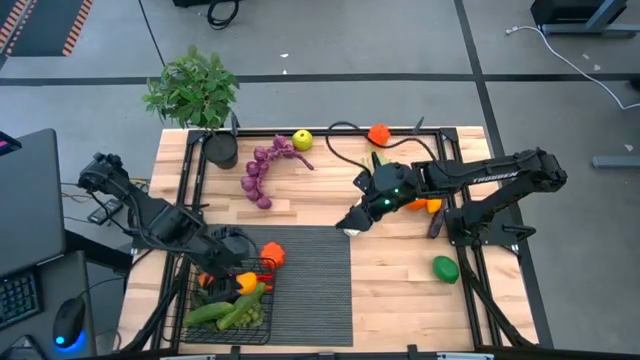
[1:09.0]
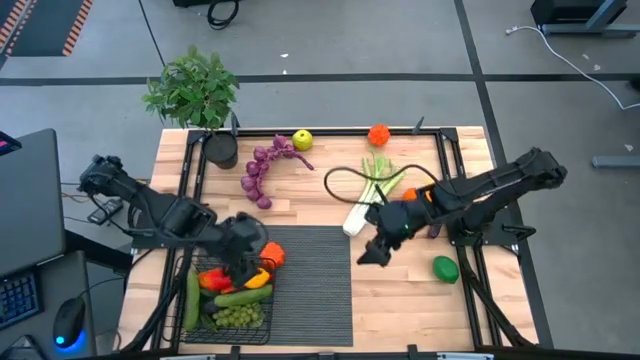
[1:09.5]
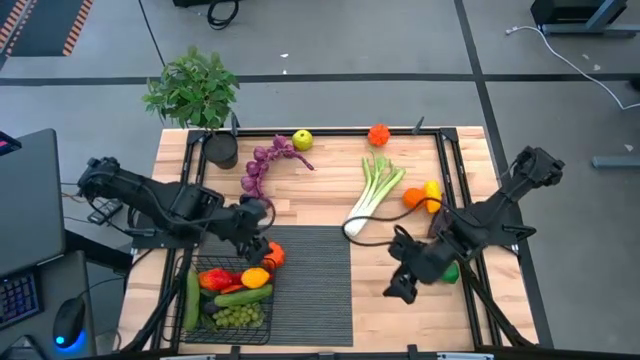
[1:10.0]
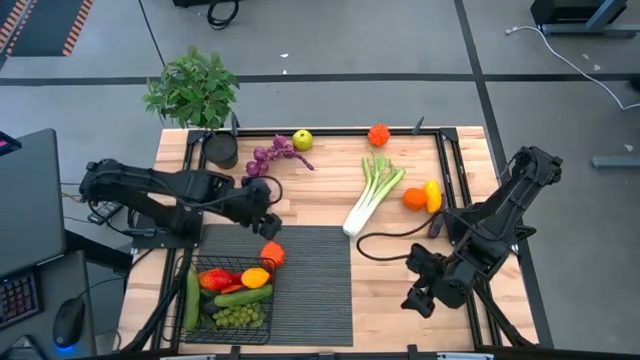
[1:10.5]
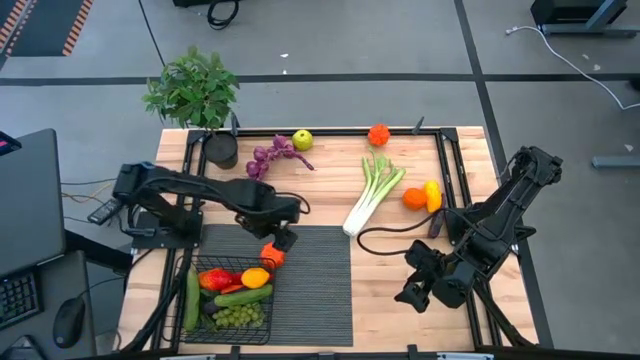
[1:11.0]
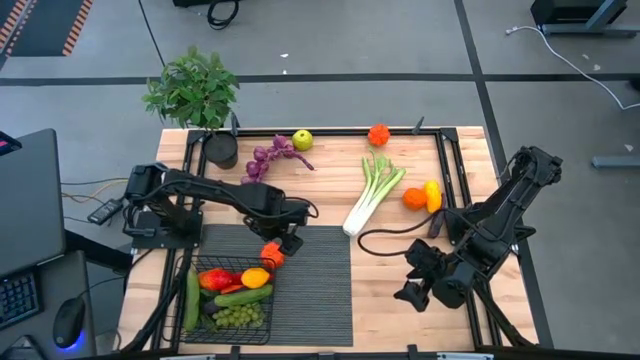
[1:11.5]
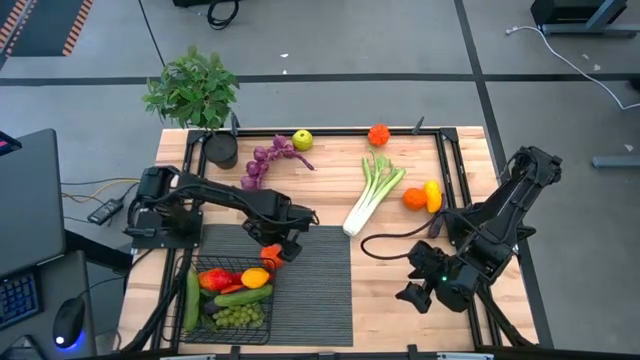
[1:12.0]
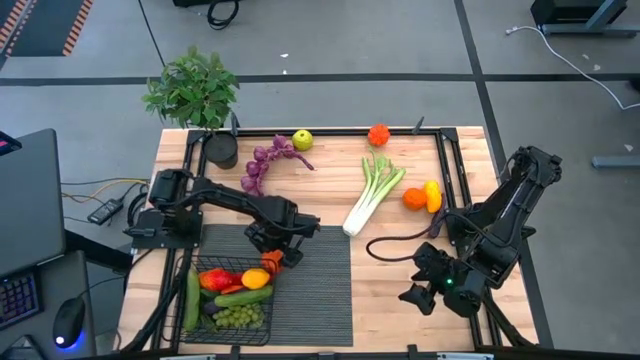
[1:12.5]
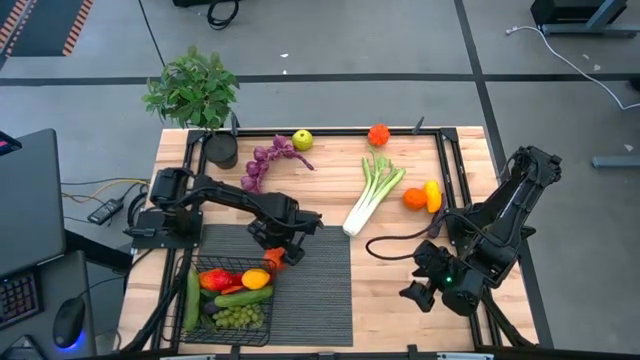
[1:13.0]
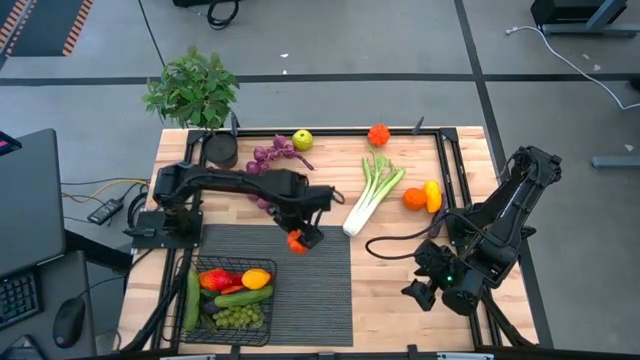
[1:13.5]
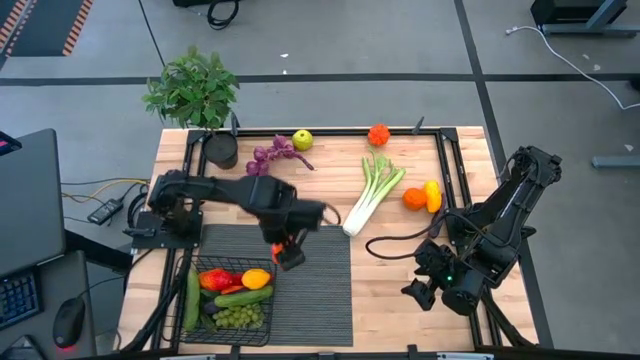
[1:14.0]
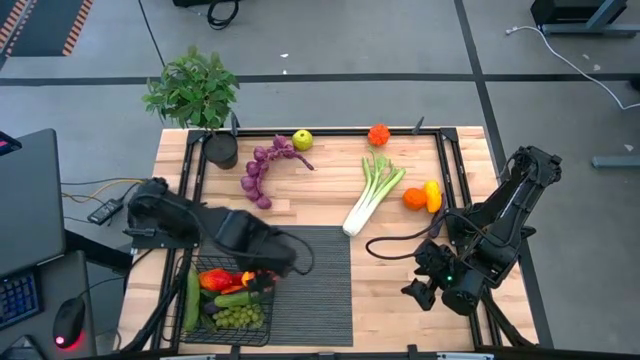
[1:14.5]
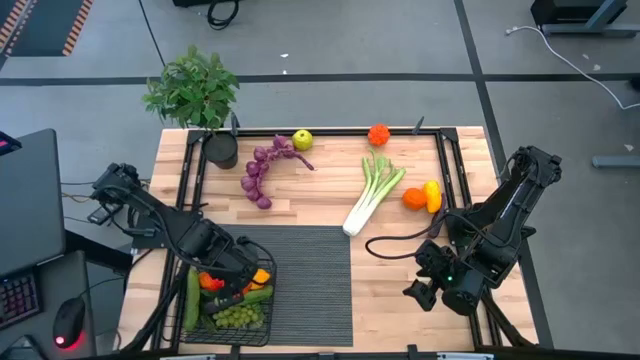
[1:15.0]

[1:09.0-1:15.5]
Task: Build produce basket
Put the bottom orange pumpkin into the wire basket

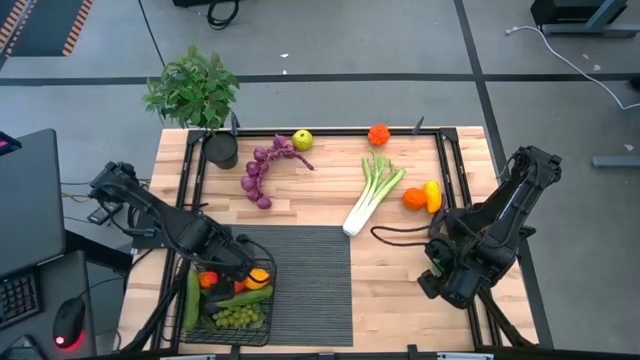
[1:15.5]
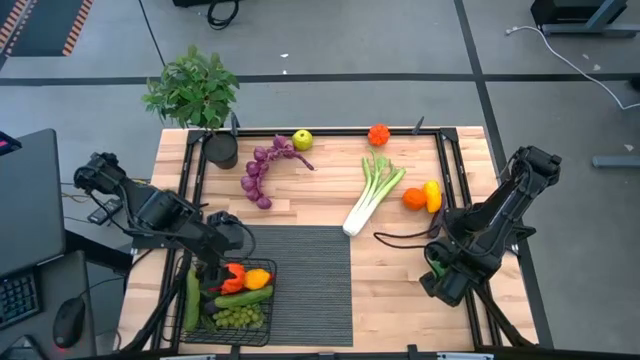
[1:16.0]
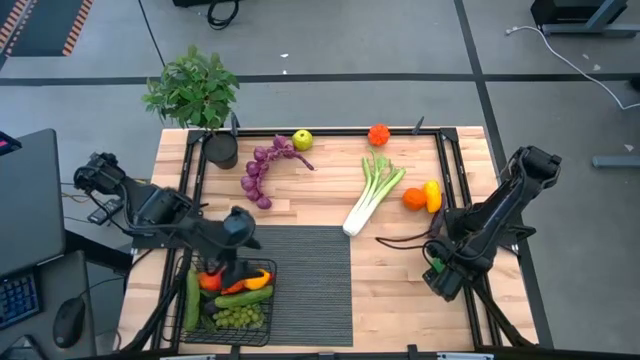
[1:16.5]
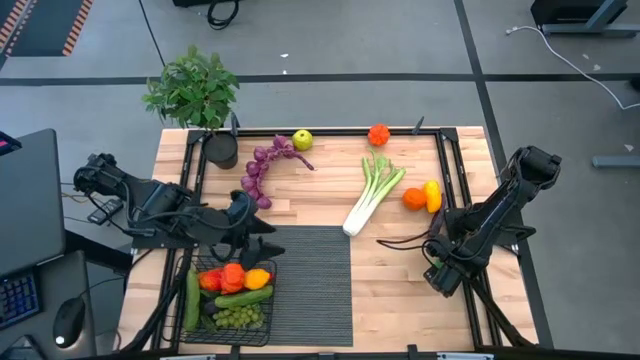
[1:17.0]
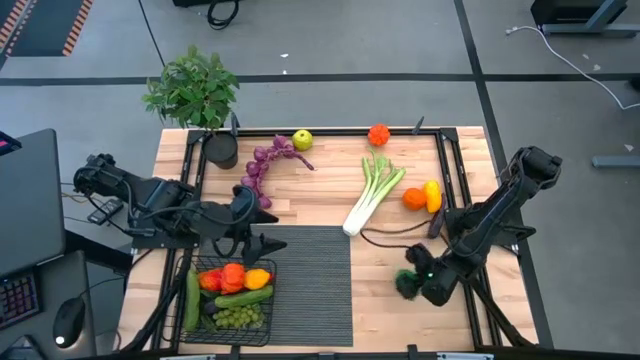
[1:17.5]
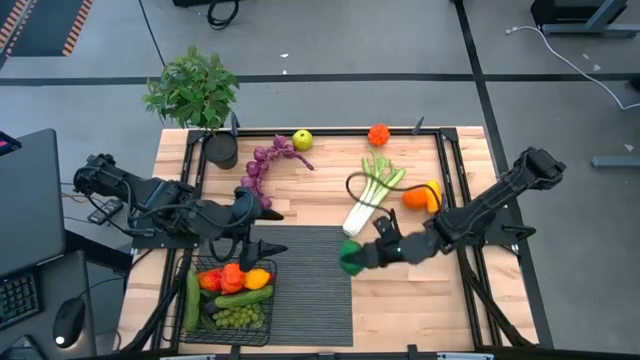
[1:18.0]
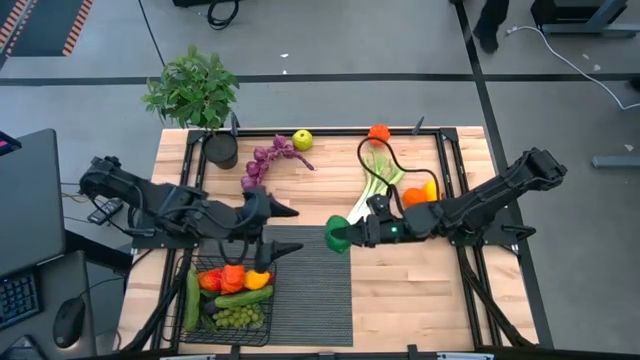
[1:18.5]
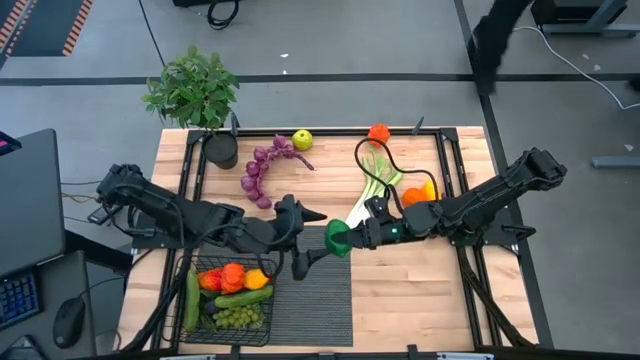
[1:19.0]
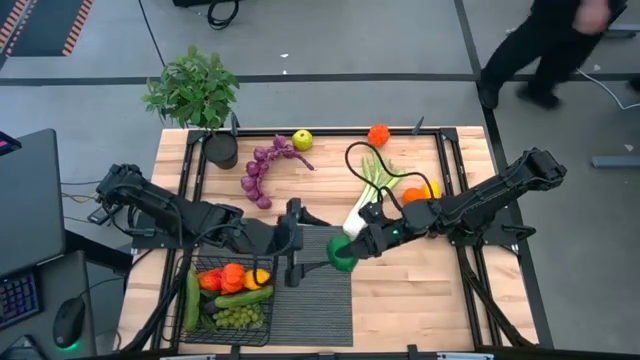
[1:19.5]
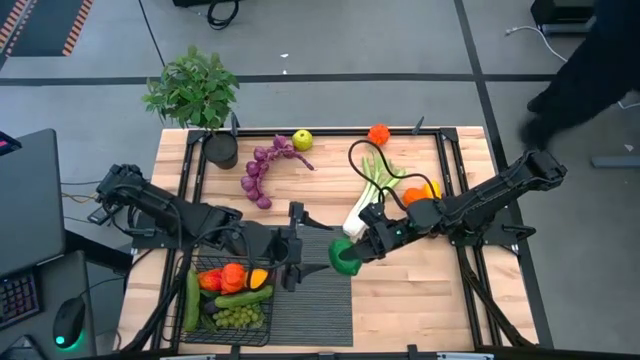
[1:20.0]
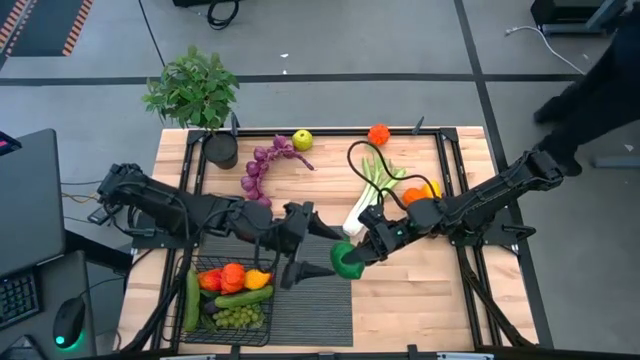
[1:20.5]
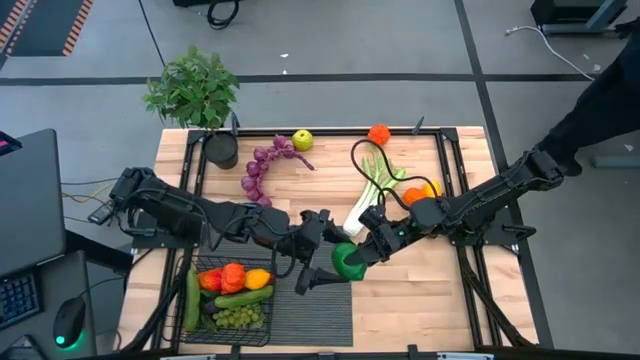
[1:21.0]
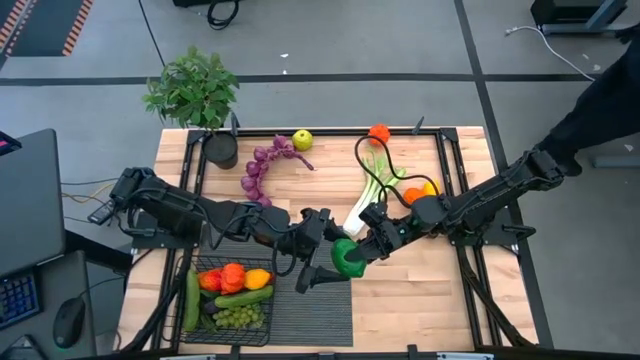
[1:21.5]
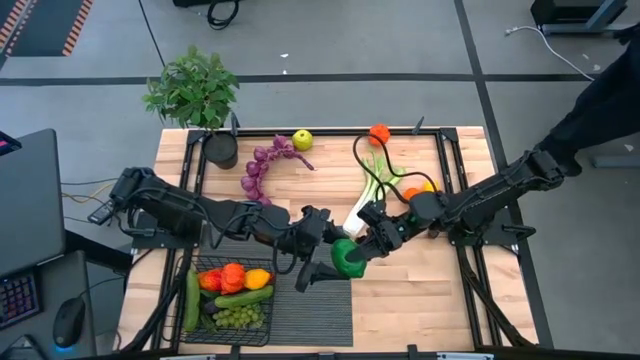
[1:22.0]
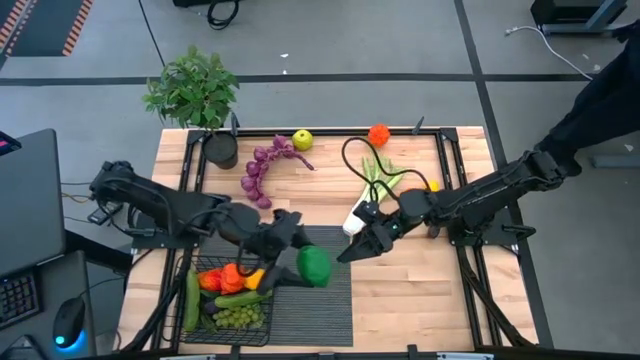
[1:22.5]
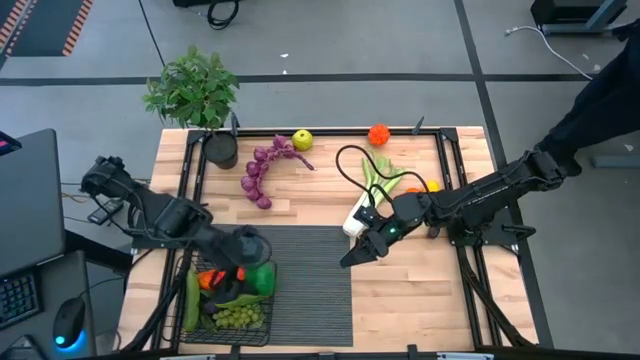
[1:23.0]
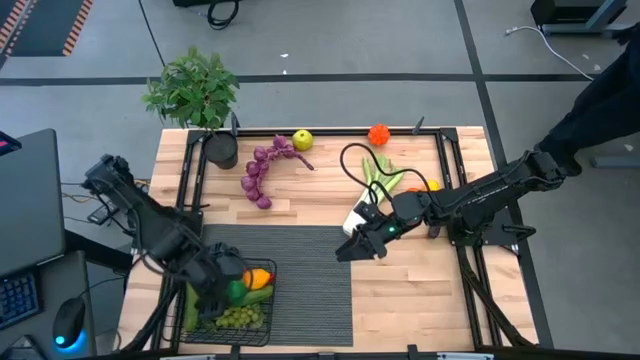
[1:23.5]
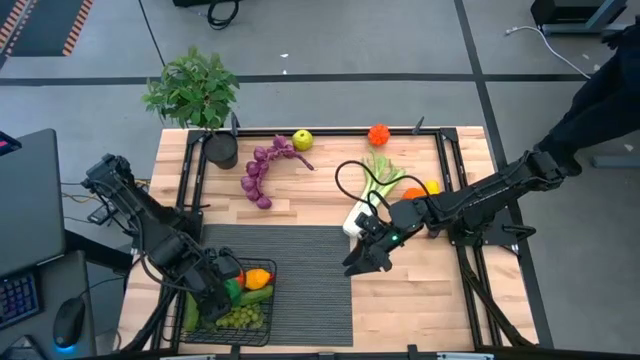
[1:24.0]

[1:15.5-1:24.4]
Put the green lime into the wire basket

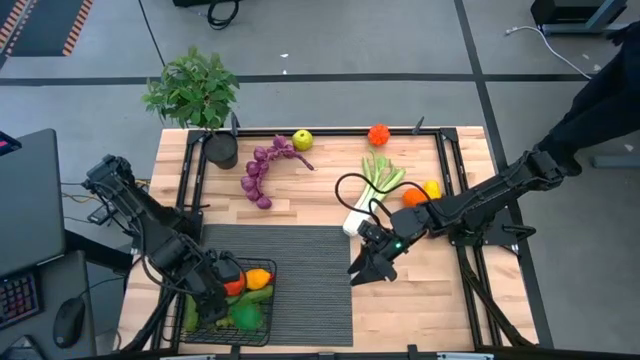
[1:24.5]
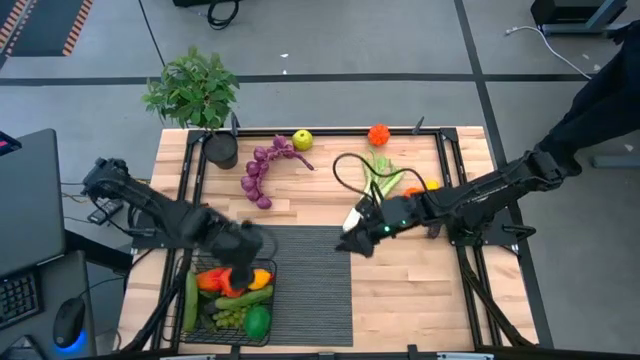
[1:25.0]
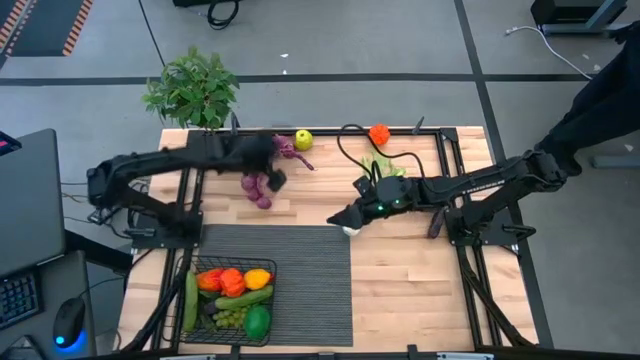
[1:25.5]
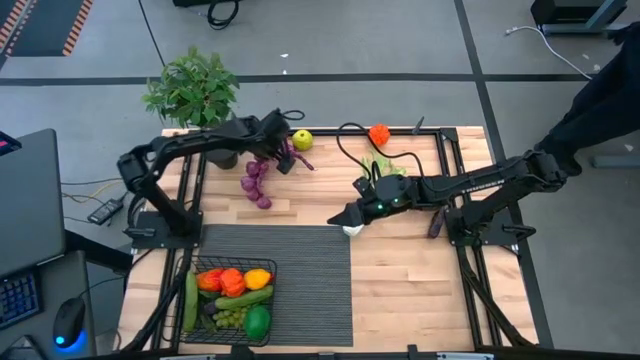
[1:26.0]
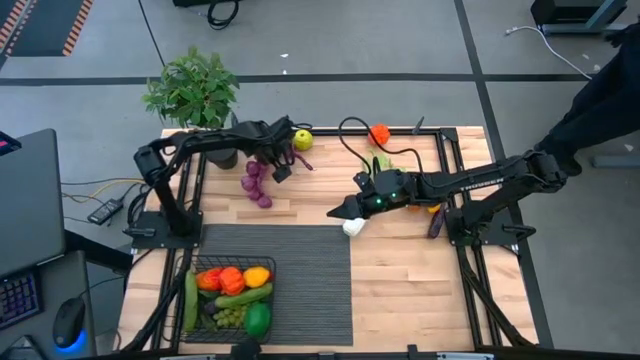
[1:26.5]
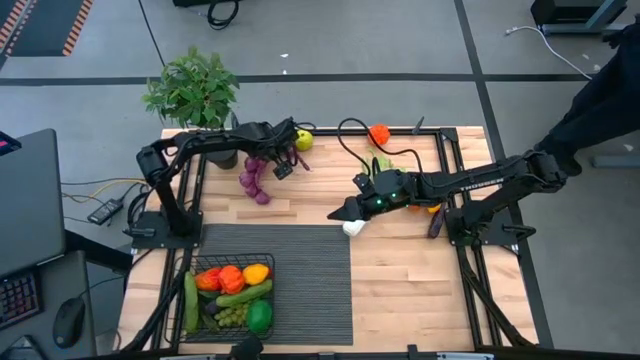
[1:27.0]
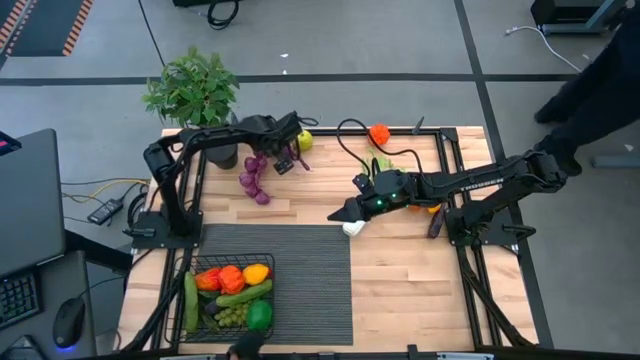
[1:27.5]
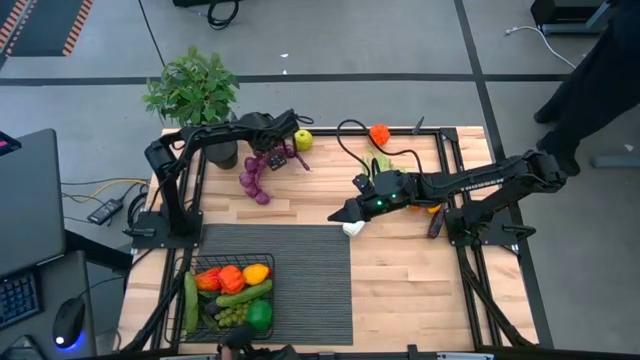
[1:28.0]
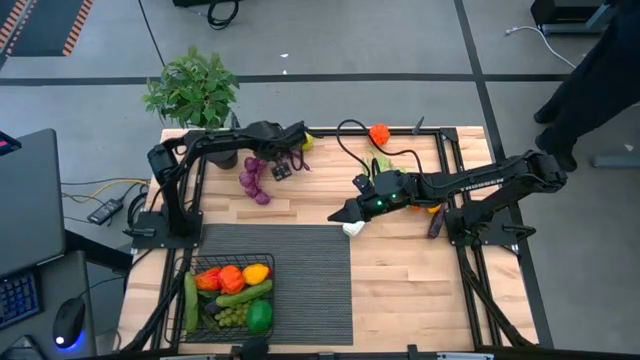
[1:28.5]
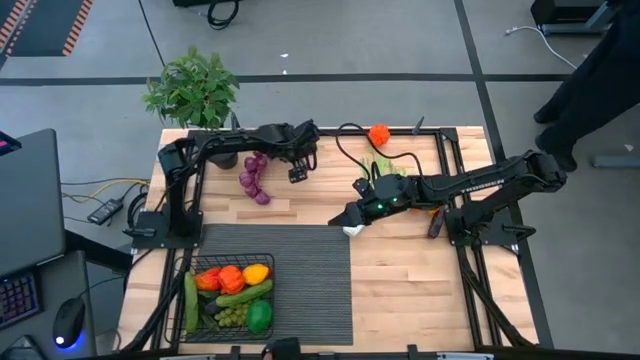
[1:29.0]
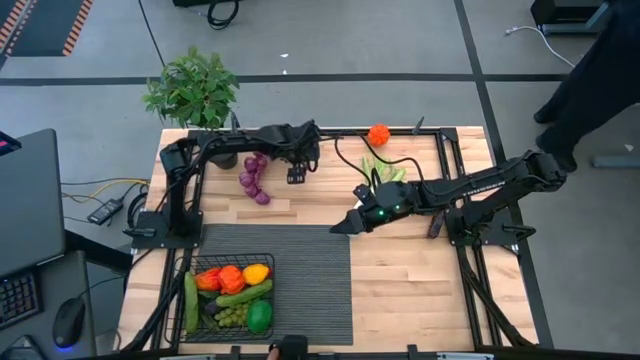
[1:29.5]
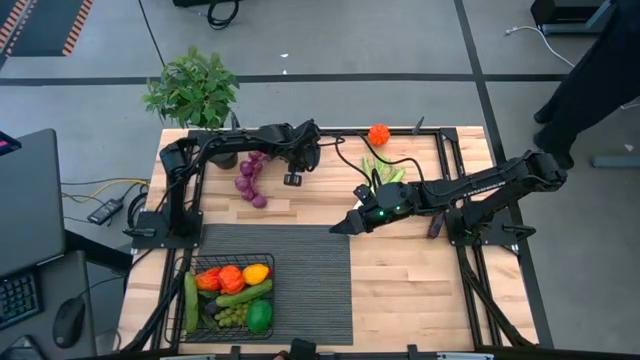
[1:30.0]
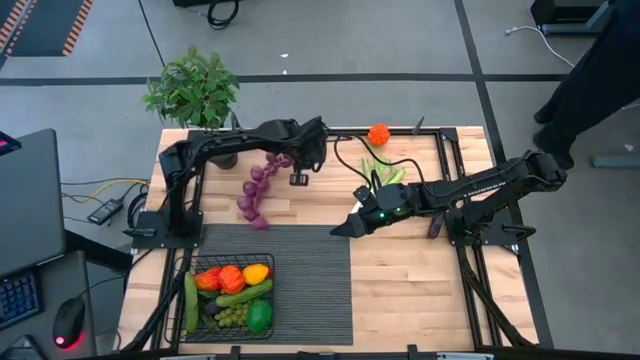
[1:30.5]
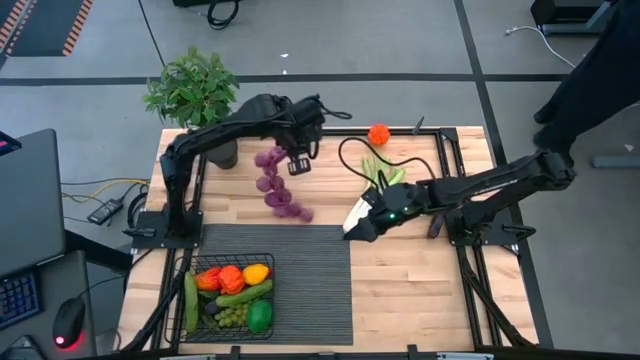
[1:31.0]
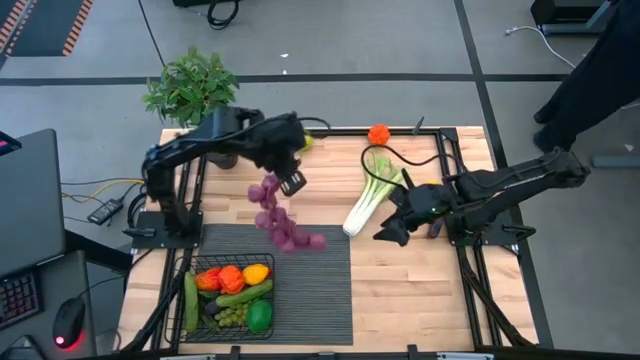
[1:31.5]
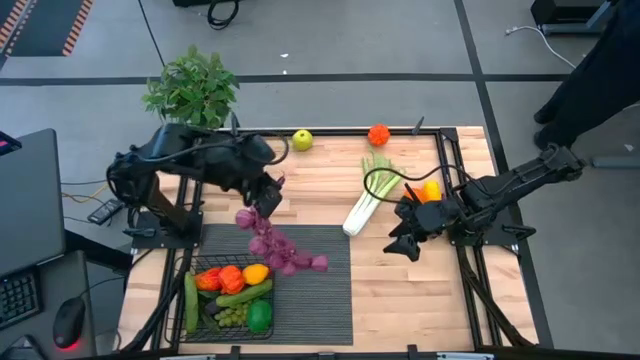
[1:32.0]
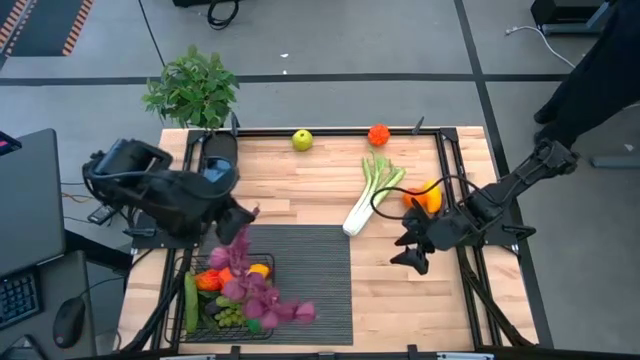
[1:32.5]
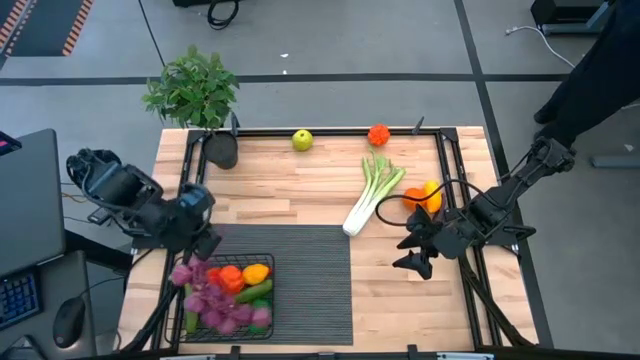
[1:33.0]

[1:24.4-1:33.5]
Put the purple garlic into the wire basket
